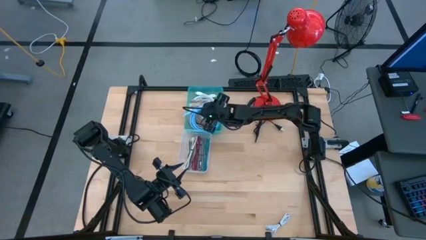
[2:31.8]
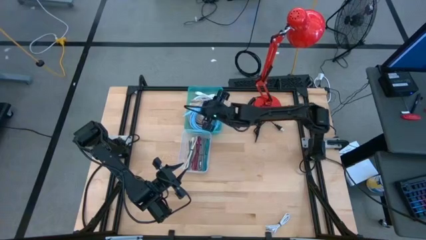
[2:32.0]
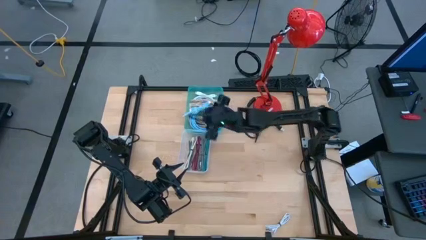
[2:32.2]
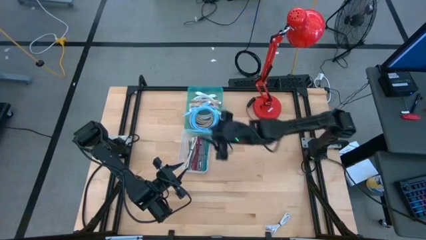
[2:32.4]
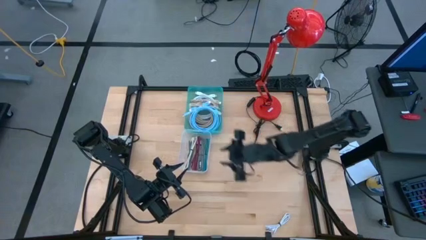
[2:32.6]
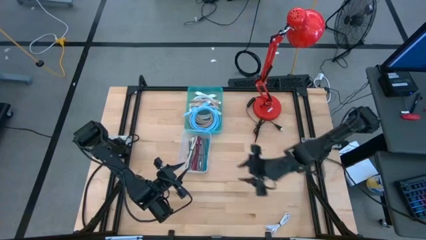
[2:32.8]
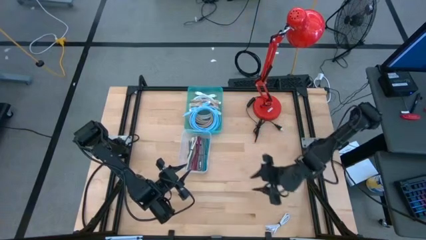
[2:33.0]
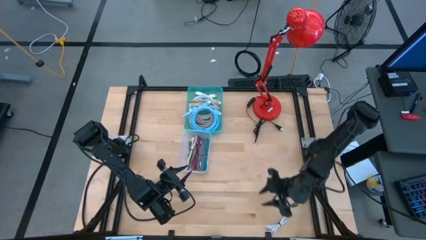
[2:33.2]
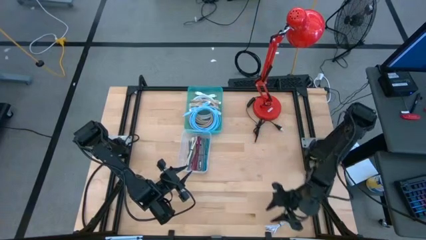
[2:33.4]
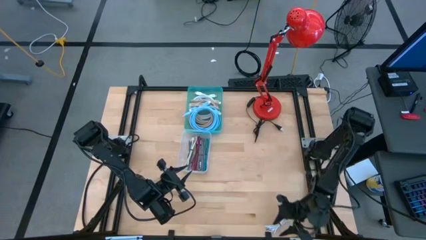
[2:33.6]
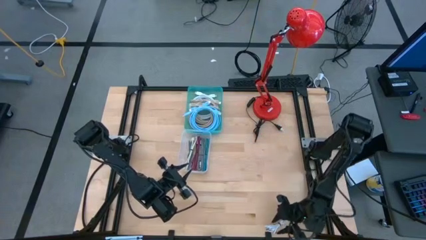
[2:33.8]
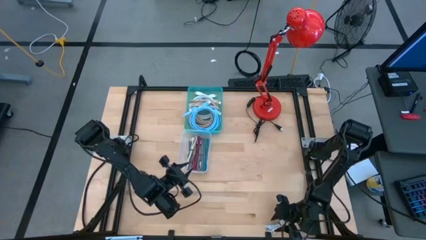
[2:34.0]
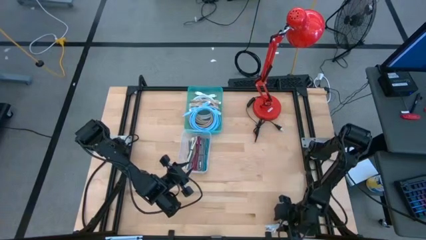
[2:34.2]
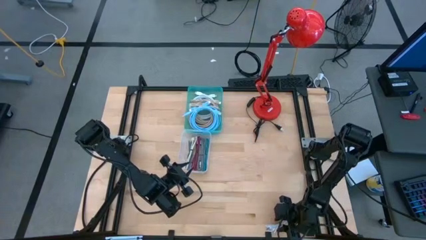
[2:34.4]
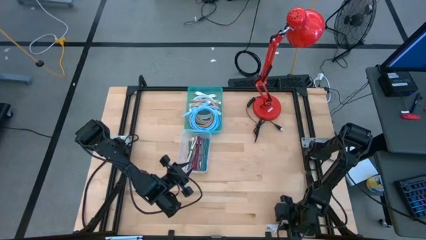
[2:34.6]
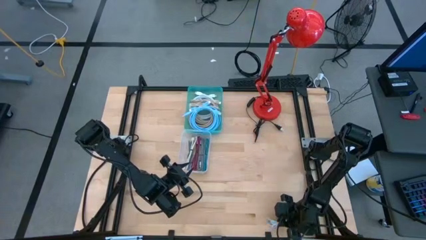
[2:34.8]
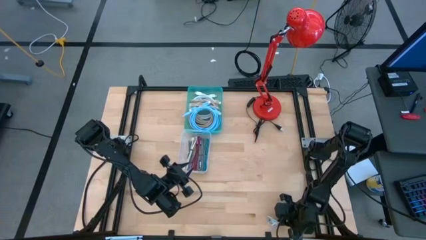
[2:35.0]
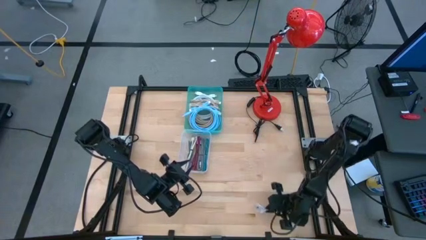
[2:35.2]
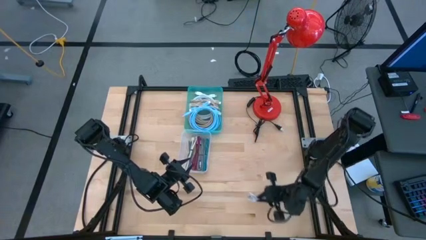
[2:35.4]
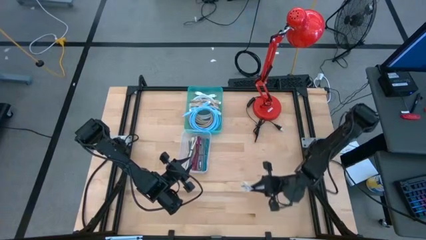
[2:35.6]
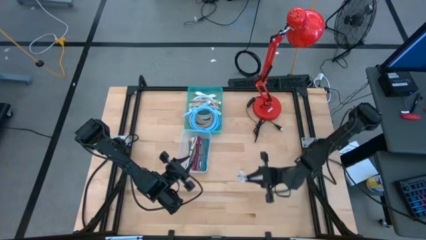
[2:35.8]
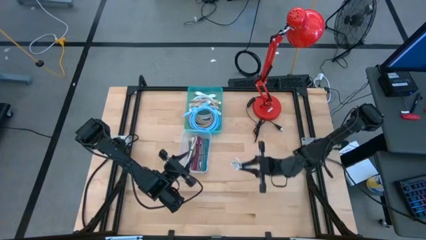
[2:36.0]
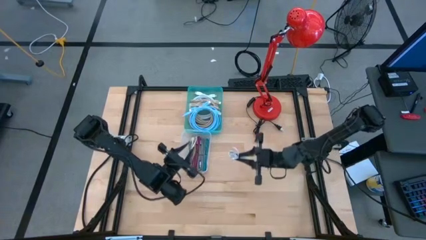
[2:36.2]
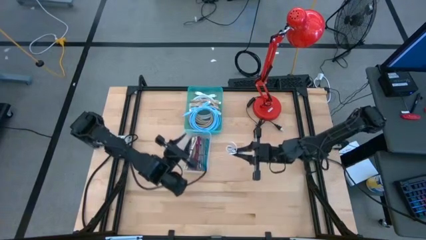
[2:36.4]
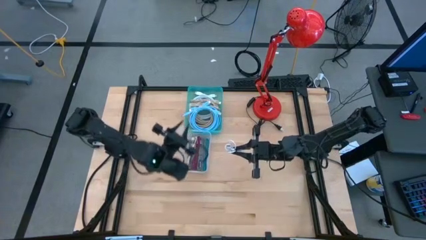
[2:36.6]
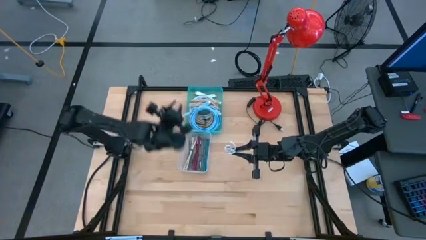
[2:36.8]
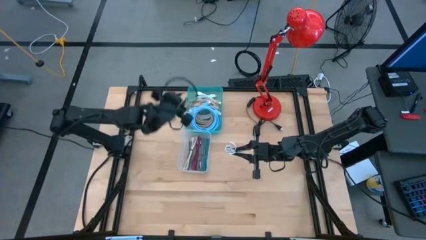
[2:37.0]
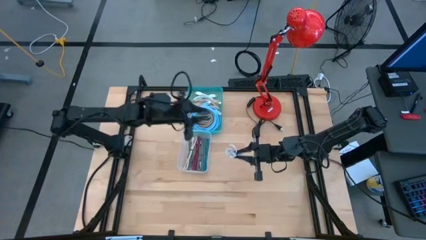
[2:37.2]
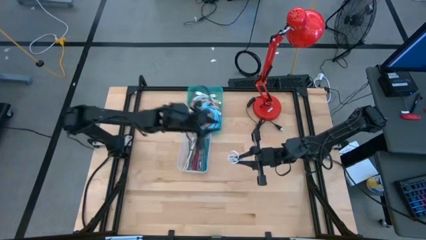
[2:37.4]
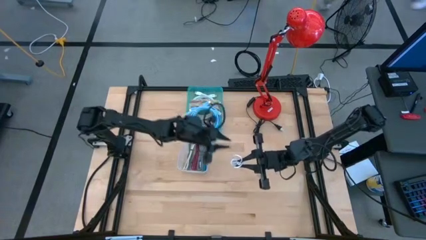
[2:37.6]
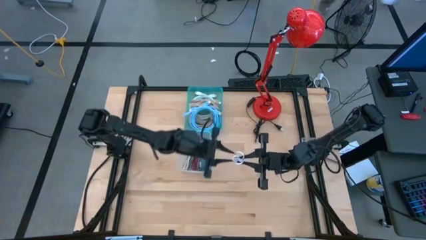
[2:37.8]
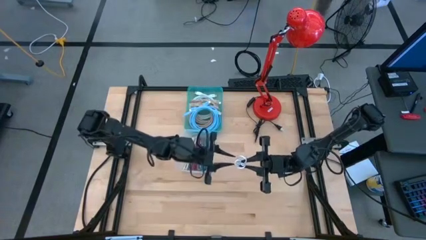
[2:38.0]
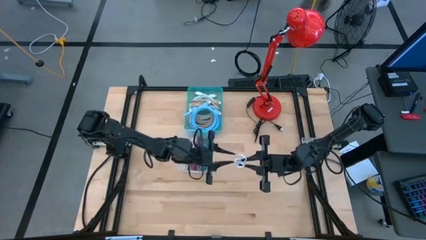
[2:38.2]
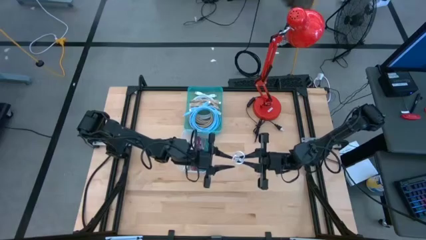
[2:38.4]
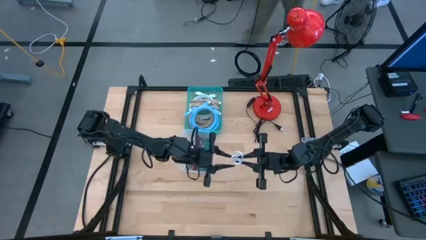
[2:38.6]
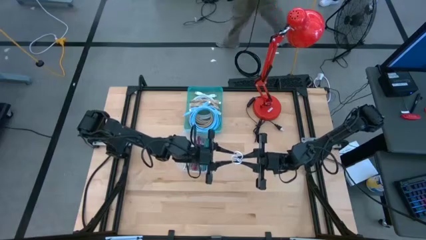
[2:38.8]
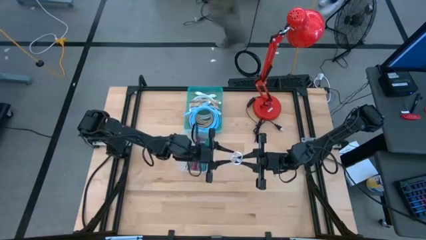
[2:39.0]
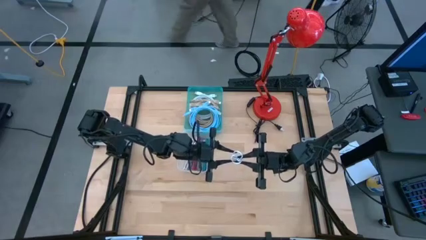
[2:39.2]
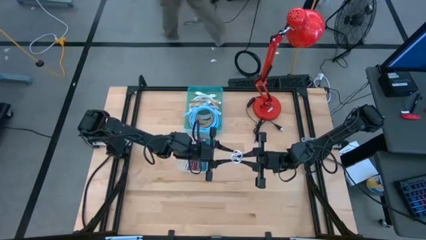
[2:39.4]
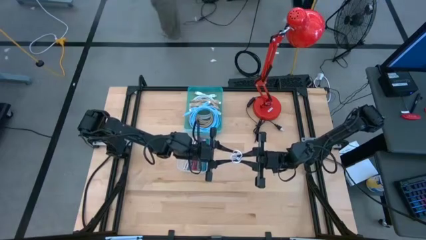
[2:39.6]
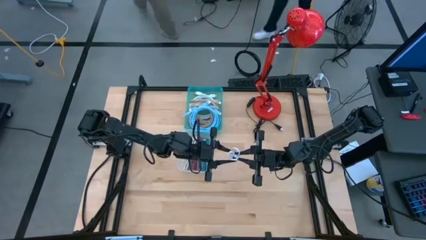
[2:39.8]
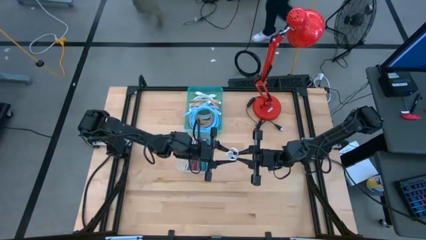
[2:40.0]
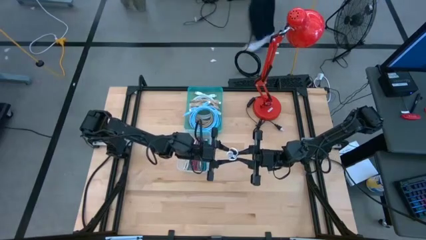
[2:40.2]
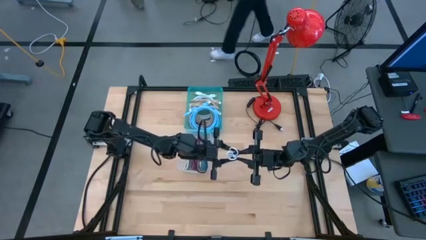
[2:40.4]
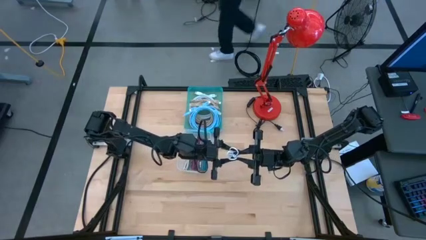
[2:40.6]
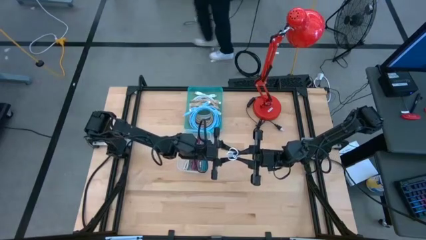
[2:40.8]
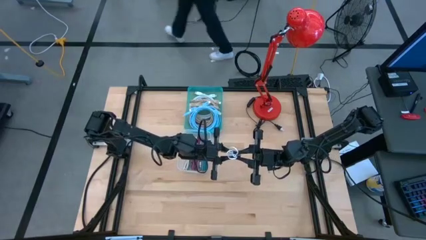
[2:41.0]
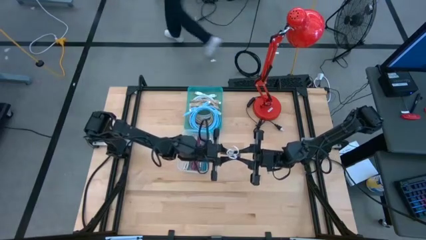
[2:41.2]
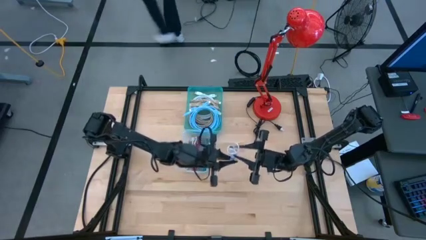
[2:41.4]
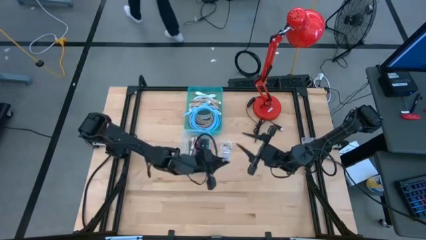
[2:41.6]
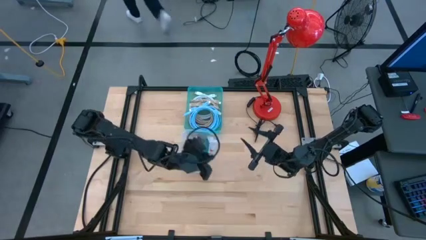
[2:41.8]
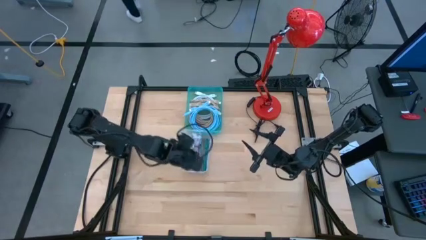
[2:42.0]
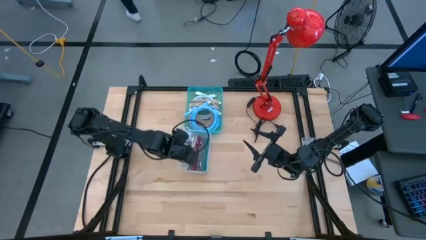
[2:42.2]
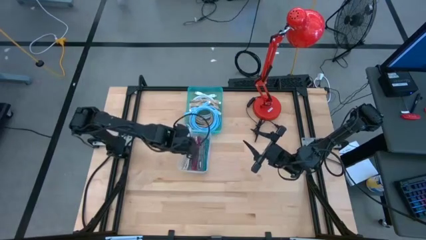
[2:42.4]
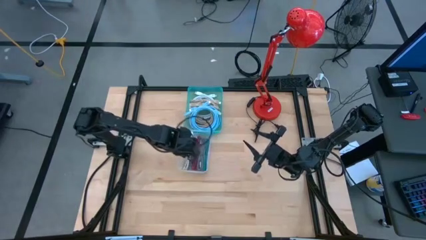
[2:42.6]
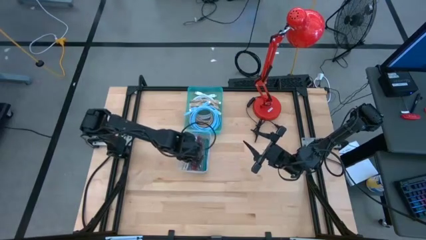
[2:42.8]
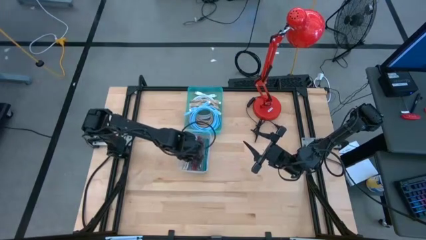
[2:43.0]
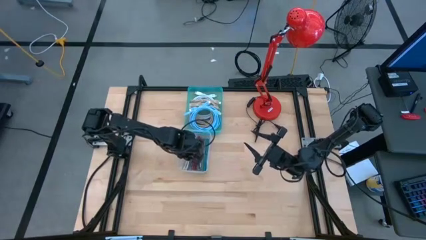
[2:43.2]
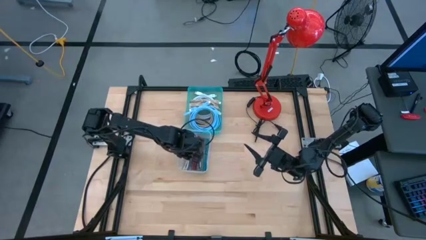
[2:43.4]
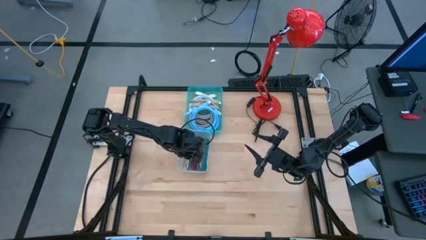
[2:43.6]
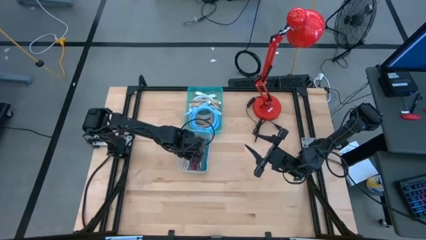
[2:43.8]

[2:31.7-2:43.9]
Task: Pick & Place USB Port
Put the white tied USB cable into the transparent bin

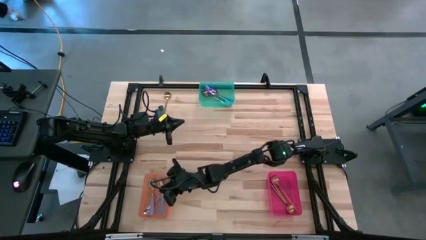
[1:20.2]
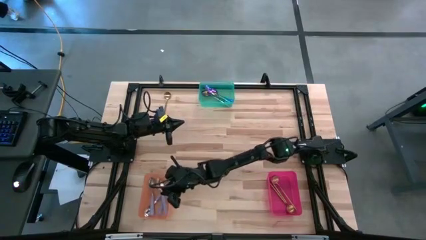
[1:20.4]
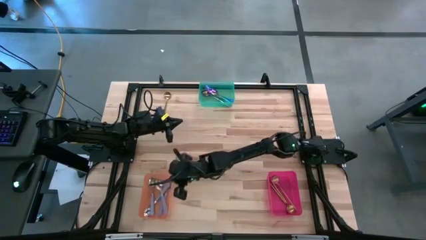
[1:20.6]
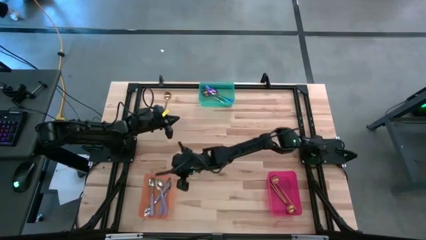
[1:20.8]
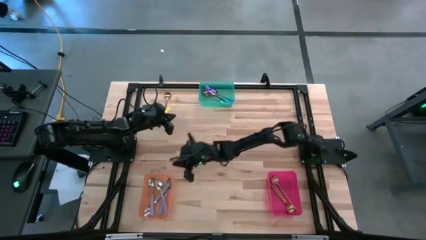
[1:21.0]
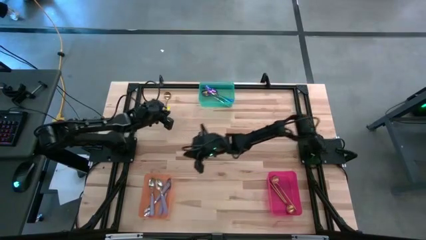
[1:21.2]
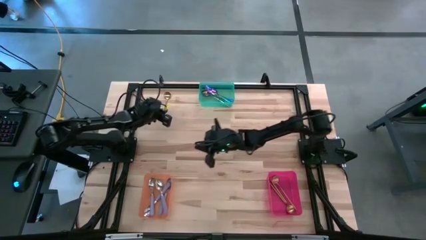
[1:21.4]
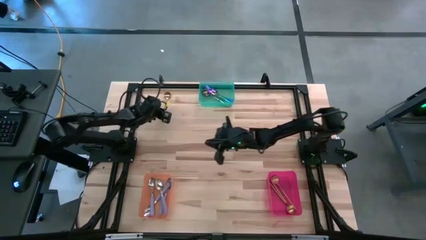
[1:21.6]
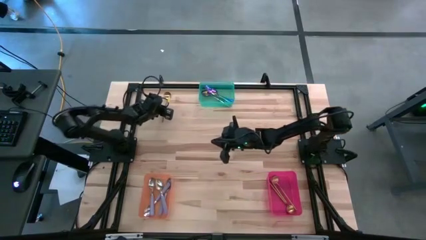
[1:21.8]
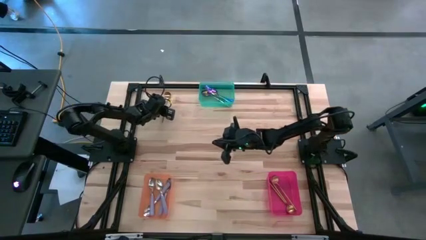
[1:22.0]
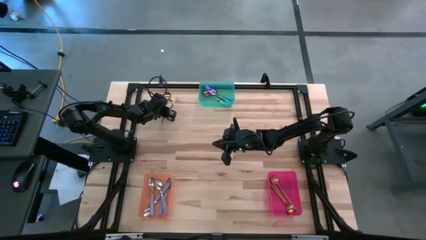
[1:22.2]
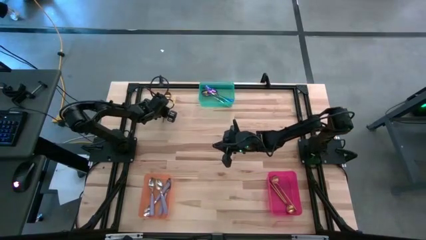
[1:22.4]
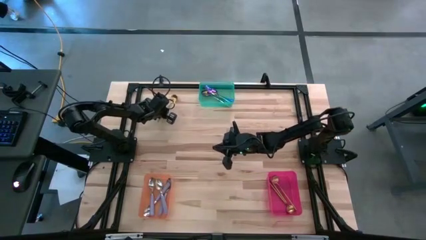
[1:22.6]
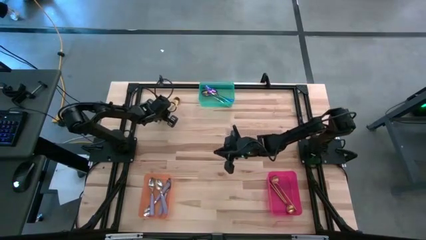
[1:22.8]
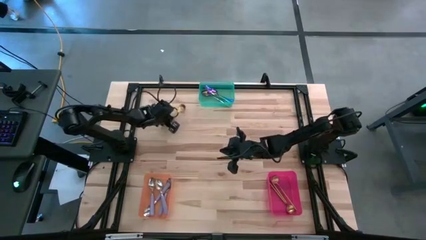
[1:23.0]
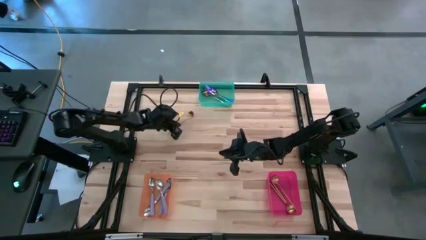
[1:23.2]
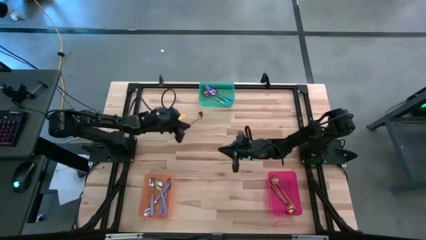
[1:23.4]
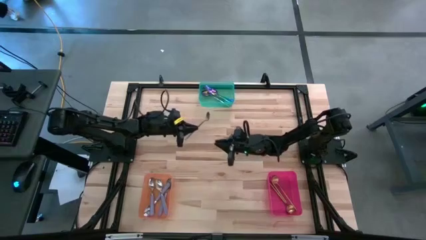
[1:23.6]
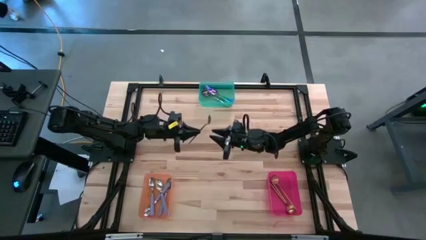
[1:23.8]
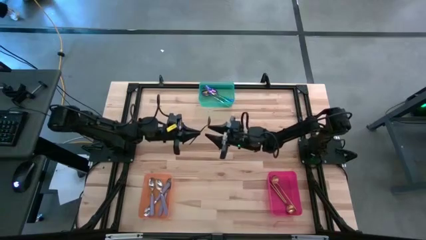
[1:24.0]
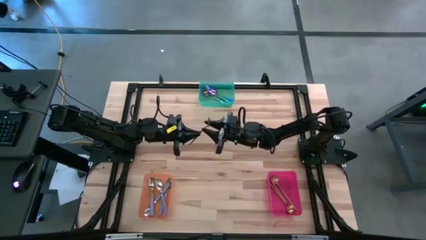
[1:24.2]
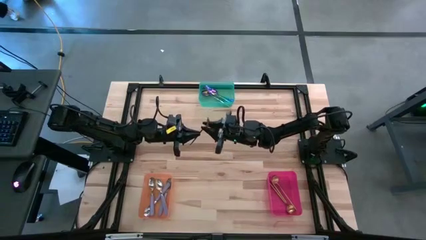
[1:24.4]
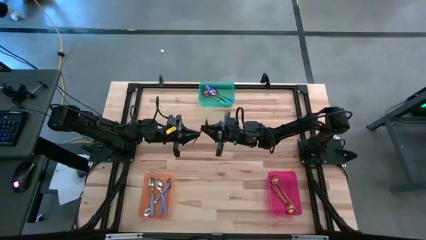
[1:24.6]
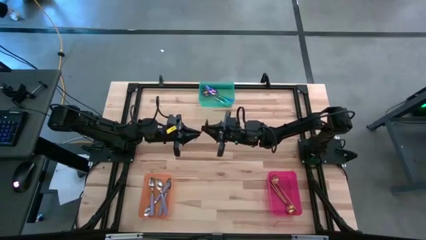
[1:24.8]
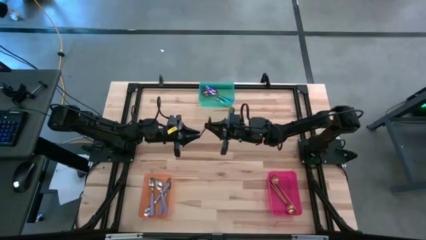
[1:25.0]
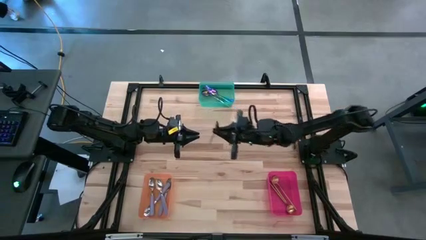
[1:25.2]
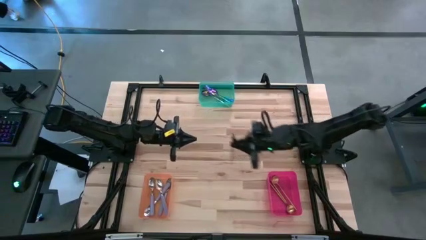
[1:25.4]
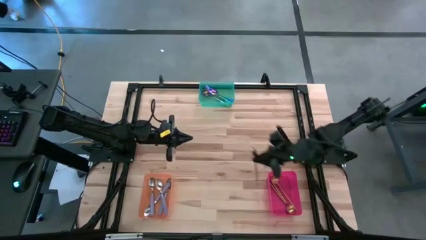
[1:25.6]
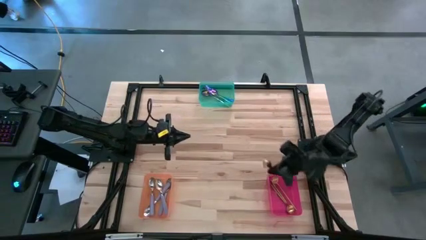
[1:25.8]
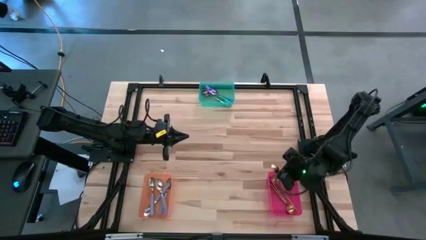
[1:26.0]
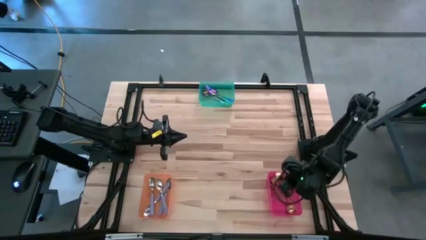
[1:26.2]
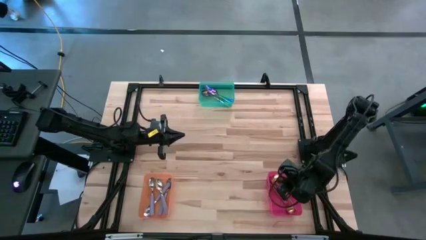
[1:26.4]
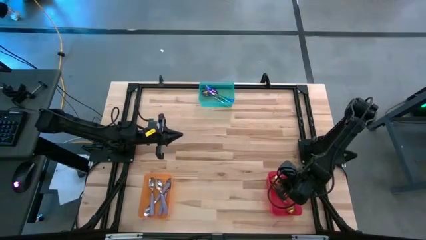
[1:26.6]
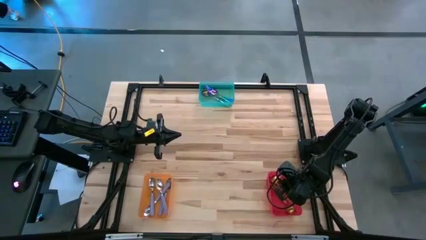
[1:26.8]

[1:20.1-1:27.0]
Task: Sort silverware by color (type)
Put the gold spoon into the pink bin
